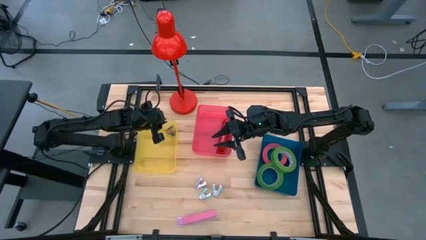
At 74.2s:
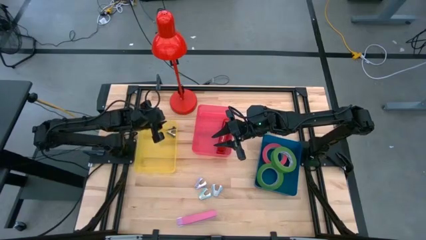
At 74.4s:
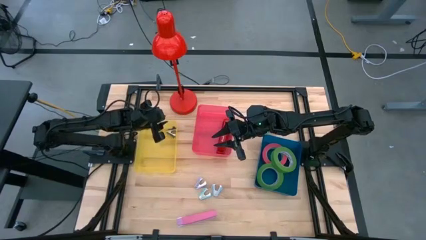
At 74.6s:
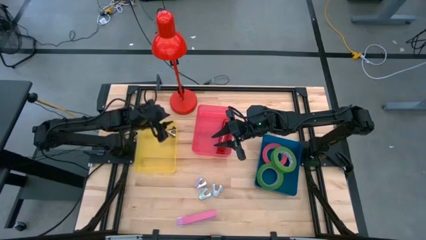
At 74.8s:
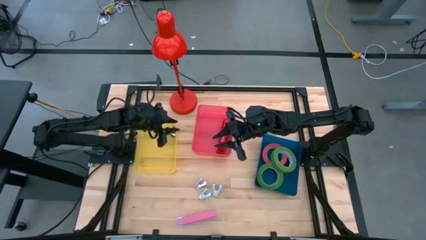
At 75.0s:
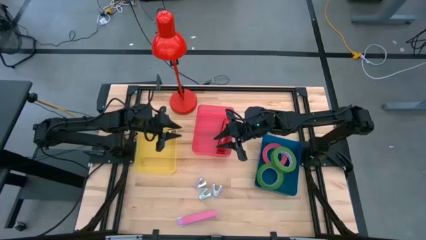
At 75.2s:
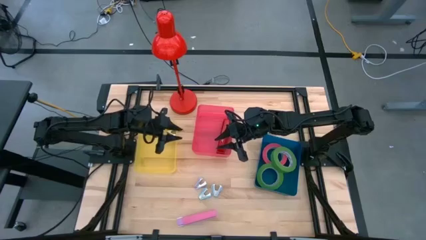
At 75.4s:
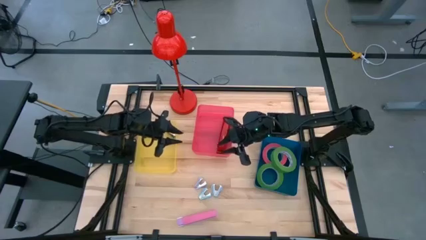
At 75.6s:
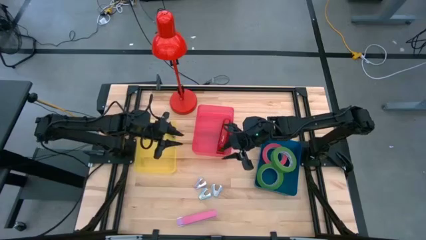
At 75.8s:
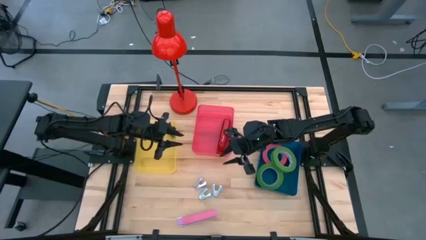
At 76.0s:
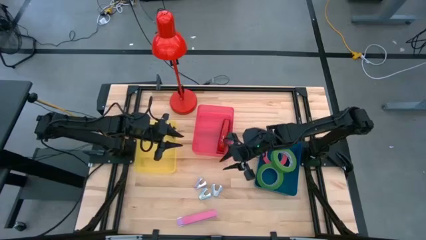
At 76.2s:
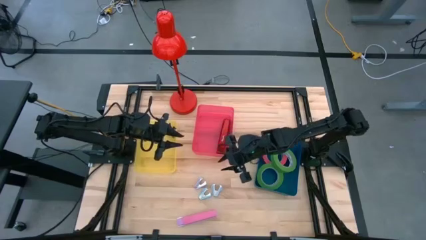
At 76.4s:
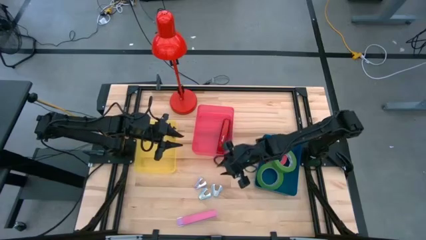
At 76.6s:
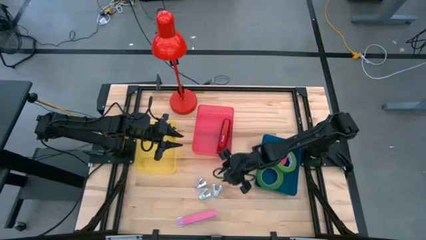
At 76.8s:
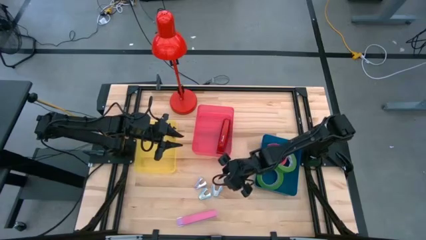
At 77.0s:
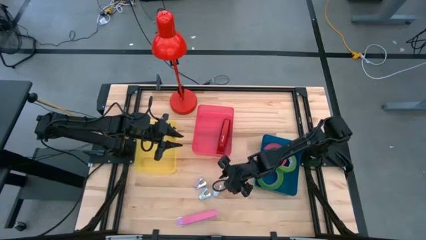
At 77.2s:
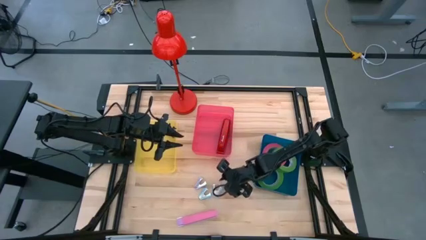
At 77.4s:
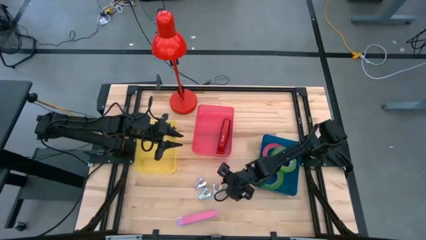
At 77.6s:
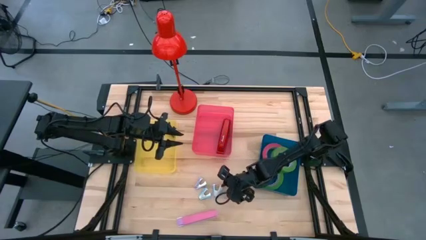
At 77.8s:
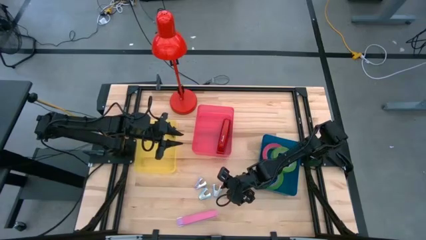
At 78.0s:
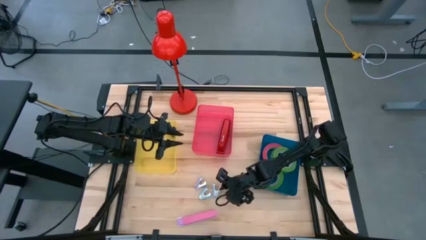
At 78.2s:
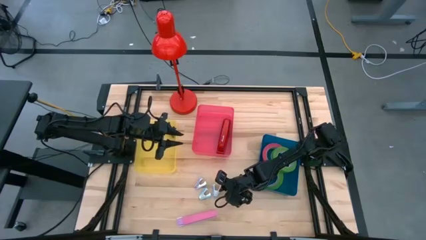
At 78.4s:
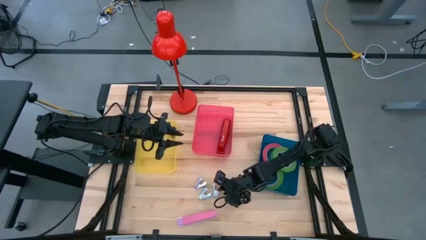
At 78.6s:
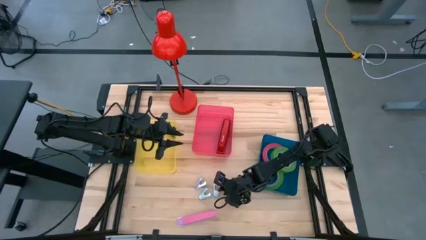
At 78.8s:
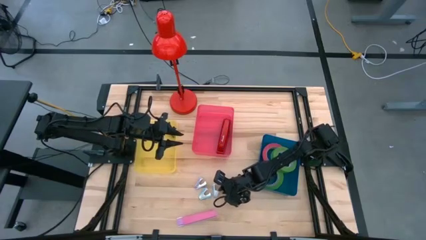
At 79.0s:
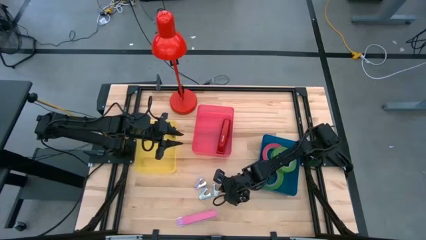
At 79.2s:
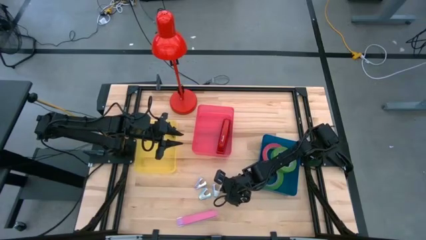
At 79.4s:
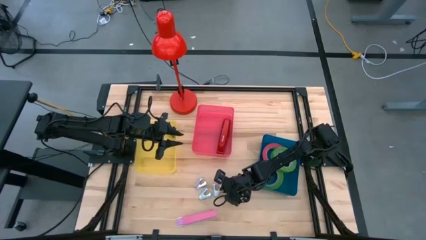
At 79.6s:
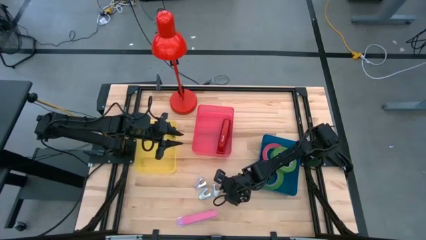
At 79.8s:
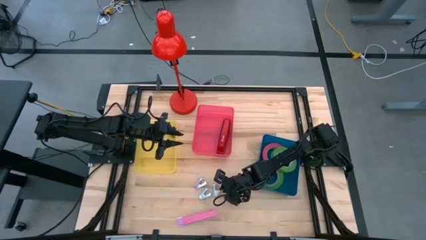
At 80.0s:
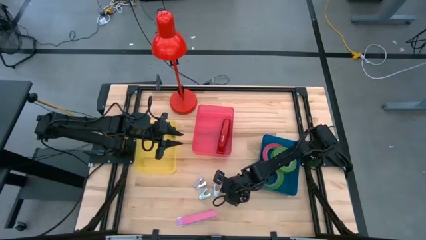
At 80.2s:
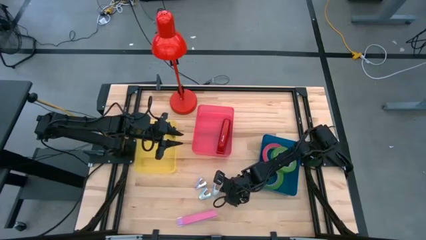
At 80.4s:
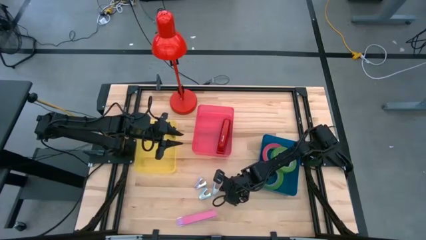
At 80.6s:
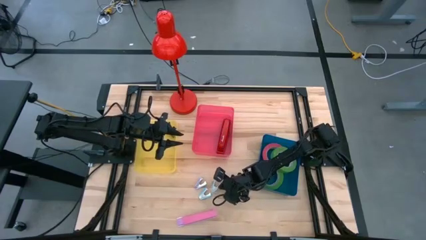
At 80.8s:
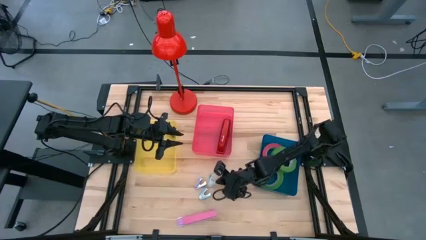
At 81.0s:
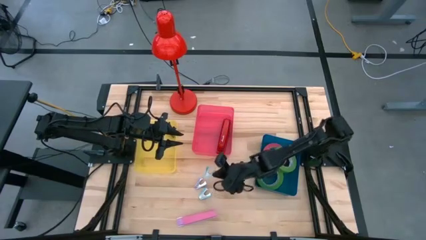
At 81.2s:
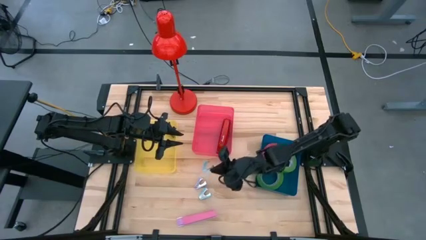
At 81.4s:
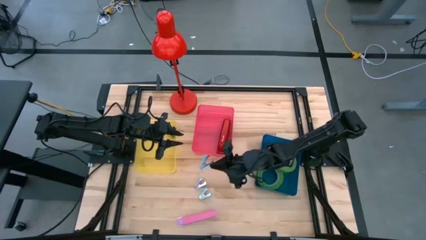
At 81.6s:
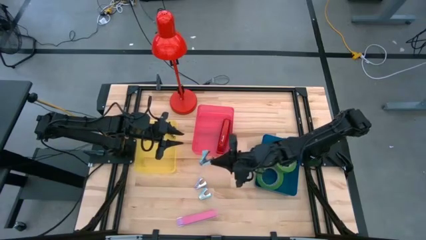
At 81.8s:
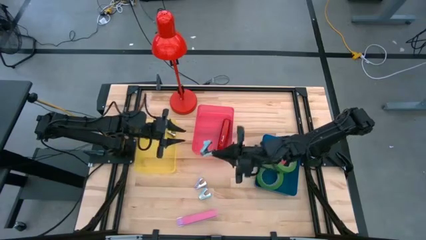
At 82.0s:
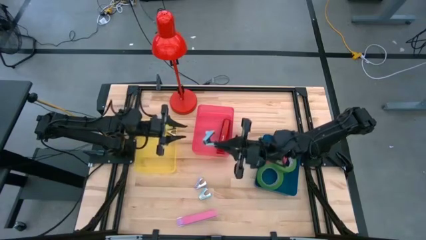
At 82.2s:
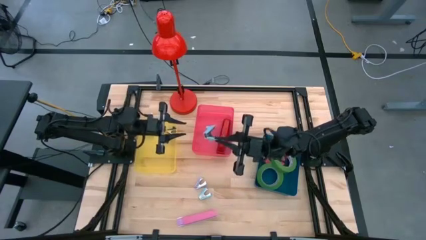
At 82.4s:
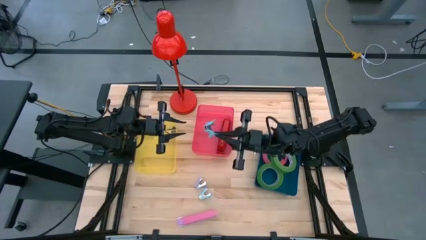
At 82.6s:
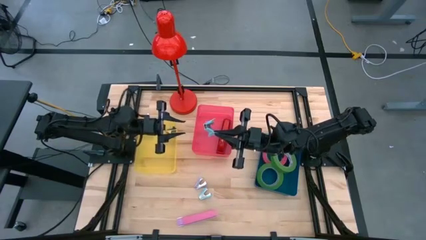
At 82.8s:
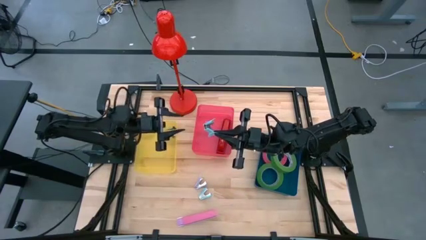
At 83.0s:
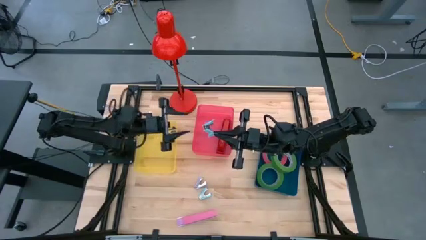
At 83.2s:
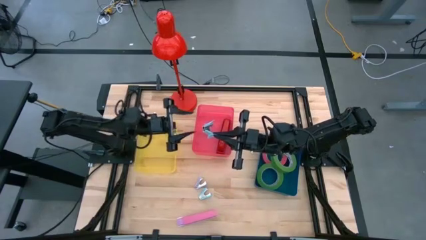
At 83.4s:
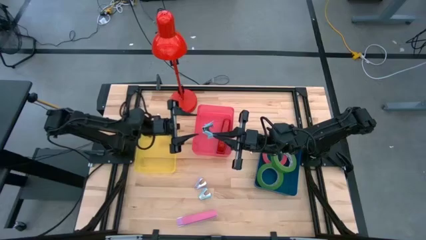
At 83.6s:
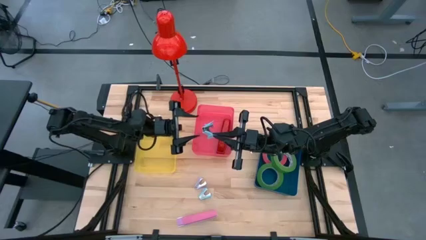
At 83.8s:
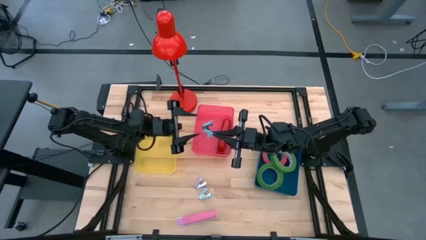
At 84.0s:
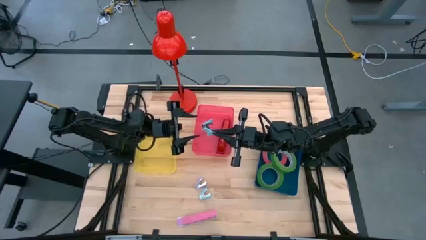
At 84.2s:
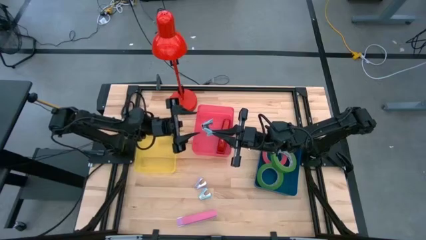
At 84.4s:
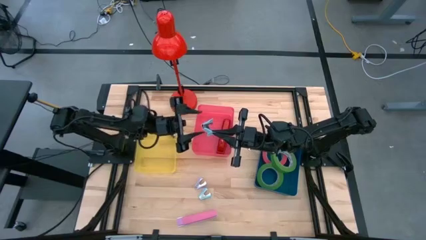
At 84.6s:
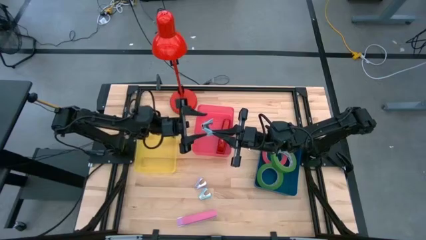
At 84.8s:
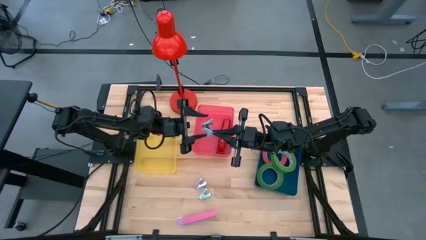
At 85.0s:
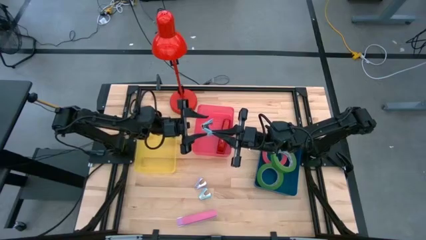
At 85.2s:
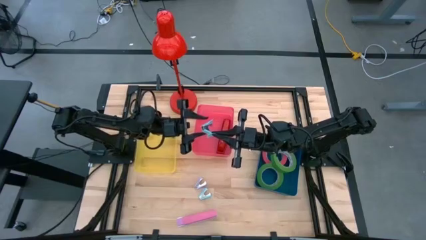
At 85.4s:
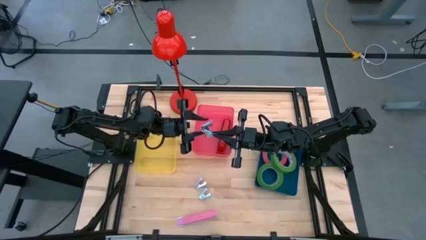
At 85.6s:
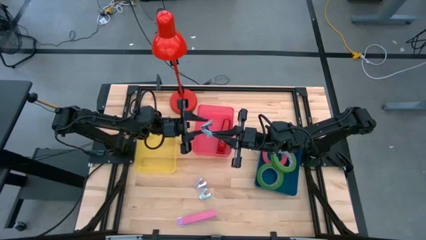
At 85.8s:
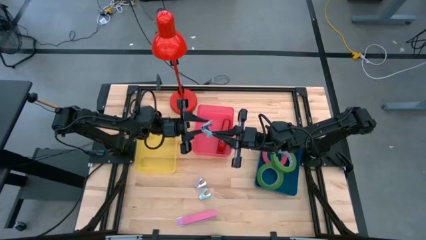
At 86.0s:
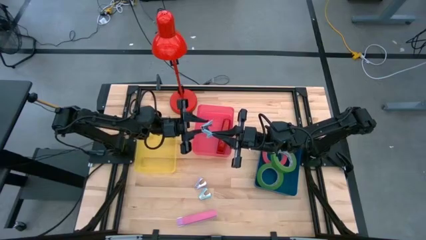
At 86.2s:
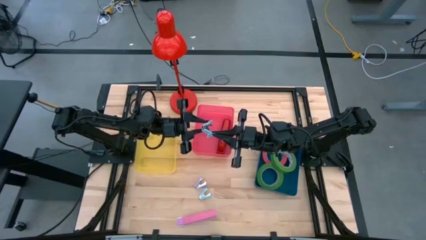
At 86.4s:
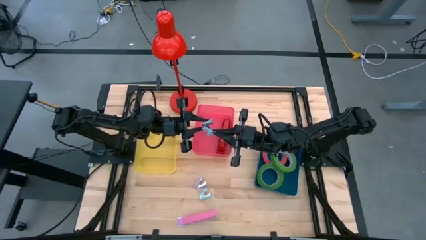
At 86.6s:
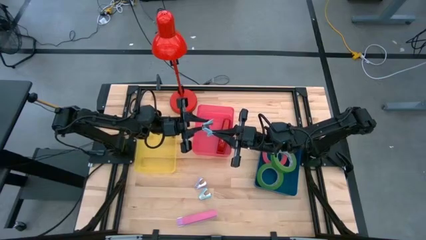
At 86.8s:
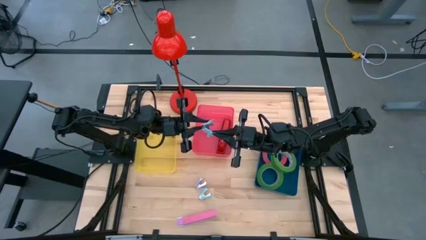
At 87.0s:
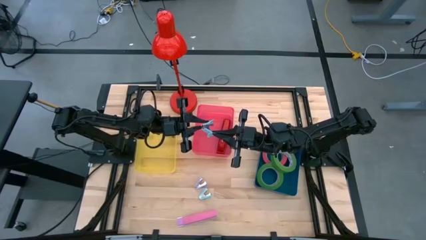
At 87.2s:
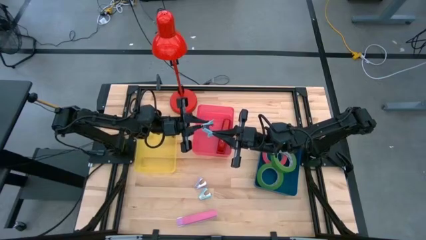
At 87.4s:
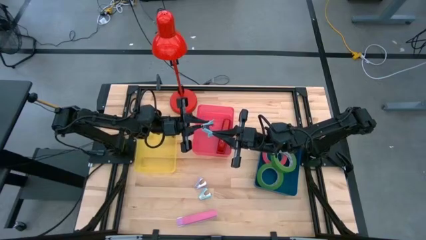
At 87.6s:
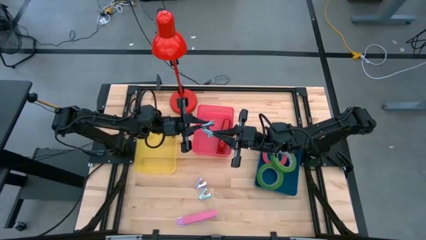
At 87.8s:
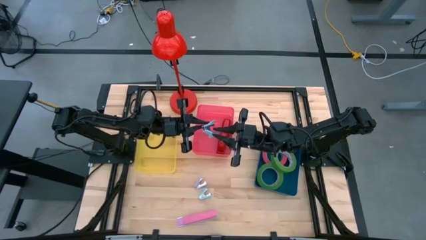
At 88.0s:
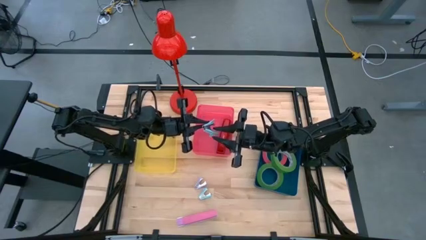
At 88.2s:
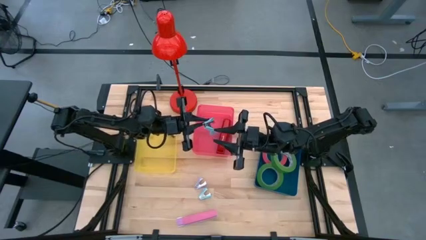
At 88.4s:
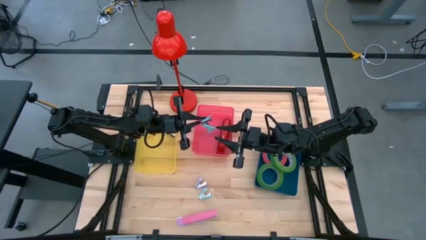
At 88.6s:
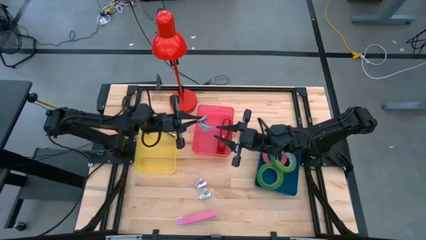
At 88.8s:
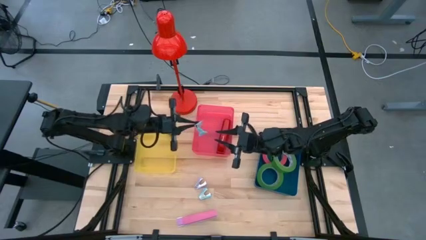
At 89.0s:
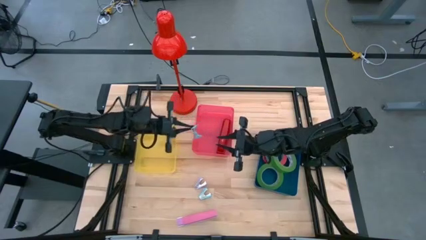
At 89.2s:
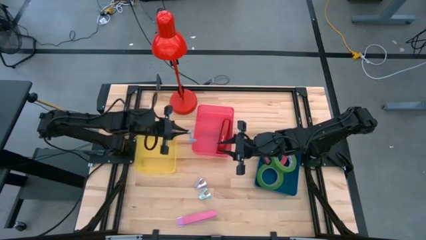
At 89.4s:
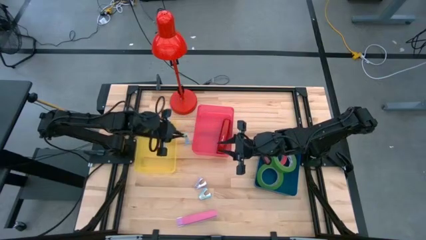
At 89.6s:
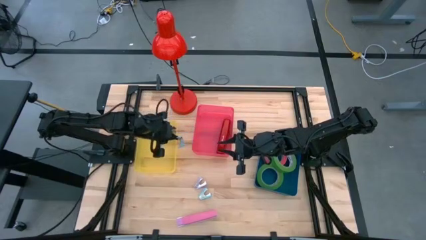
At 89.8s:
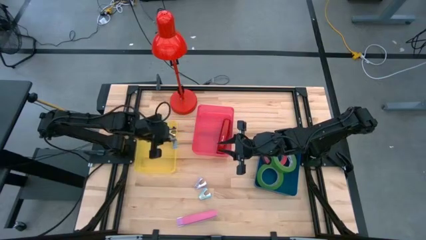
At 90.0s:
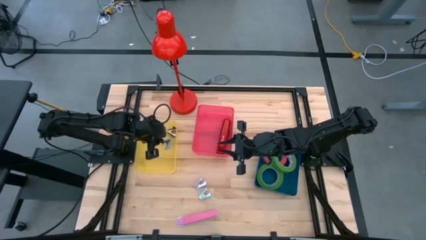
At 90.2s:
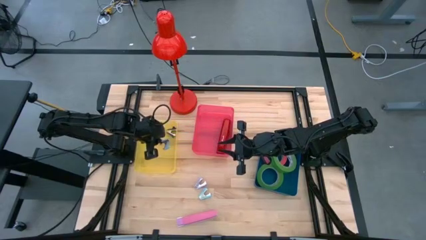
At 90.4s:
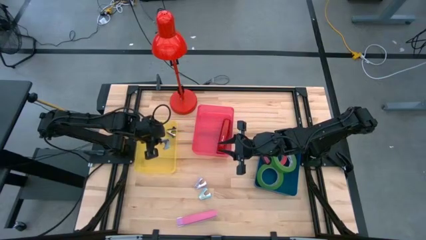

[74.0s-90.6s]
Task: Pick and place Stapler, Stapler remover, tape
Put the light blue staple remover into the yellow bin

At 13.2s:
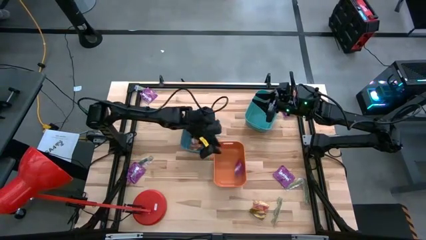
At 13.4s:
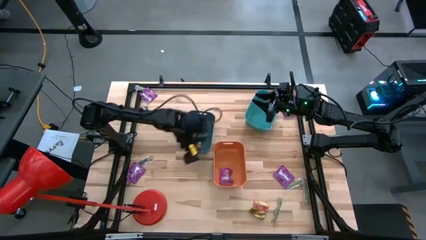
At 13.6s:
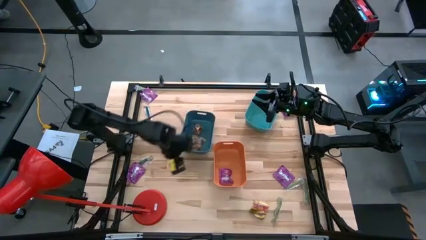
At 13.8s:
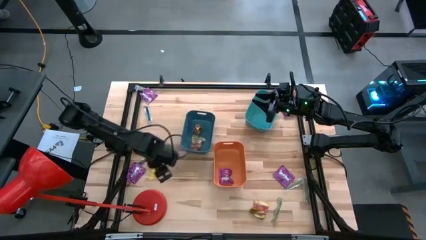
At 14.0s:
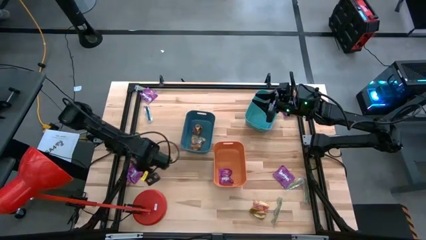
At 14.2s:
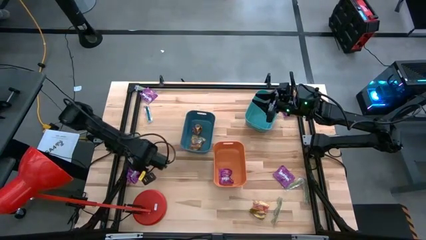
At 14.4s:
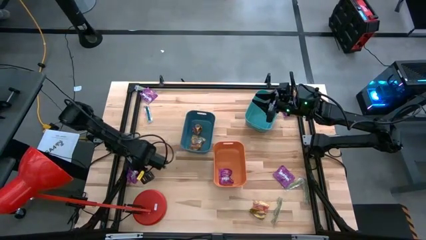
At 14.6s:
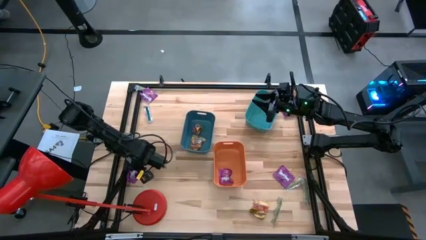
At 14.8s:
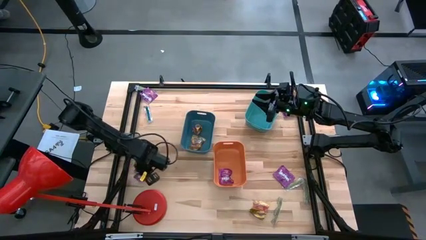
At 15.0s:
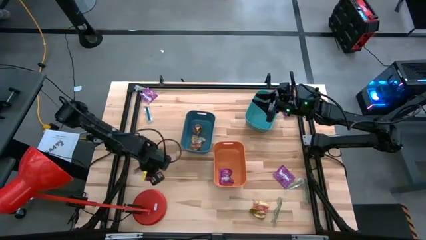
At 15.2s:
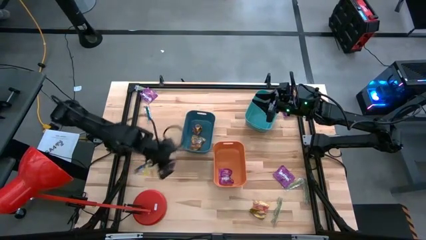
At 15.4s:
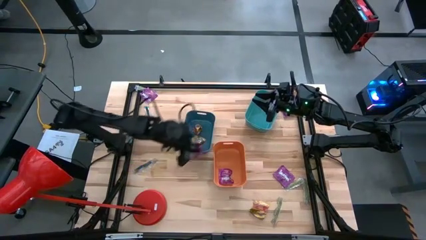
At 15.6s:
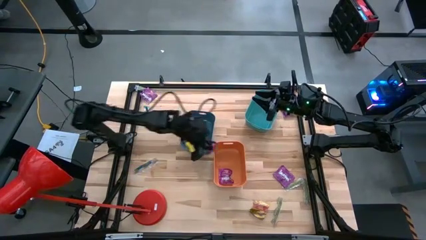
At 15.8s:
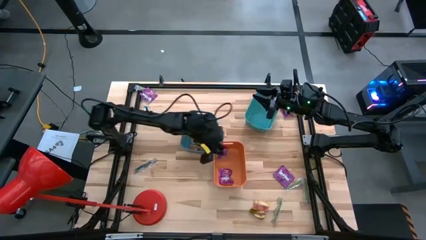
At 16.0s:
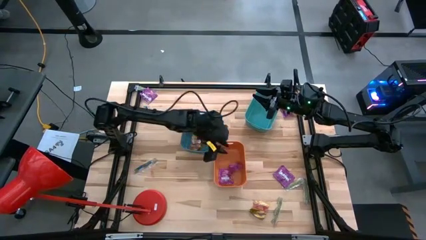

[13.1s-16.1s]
Task: Sort candy
Put the violet candy into the orange bin
